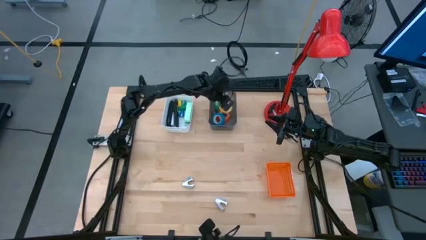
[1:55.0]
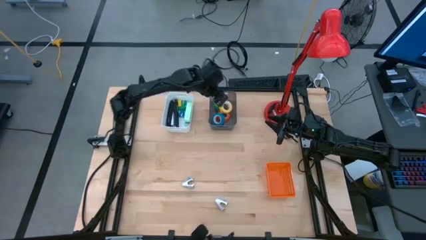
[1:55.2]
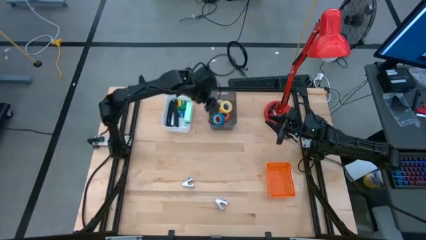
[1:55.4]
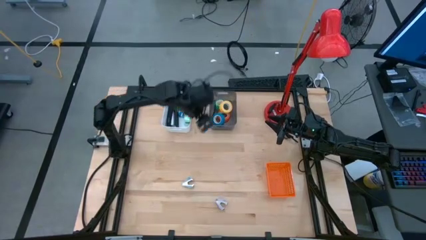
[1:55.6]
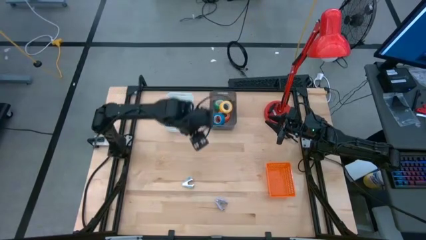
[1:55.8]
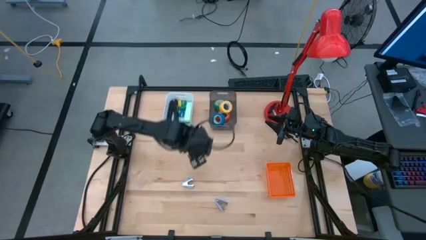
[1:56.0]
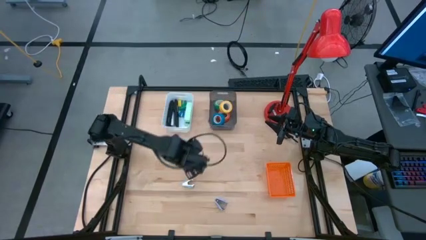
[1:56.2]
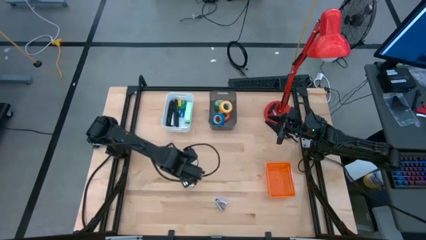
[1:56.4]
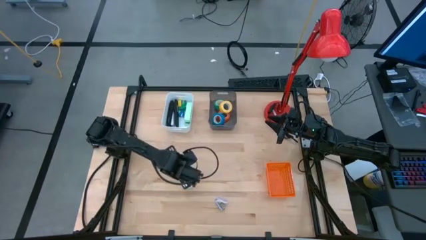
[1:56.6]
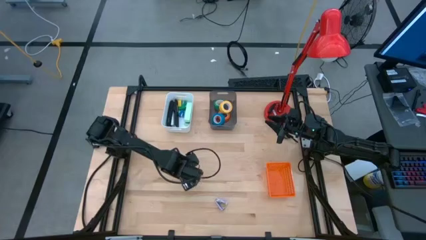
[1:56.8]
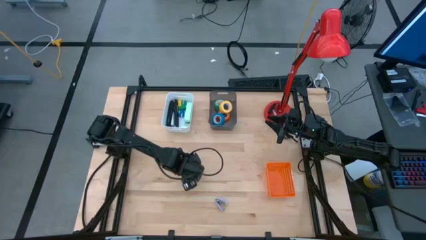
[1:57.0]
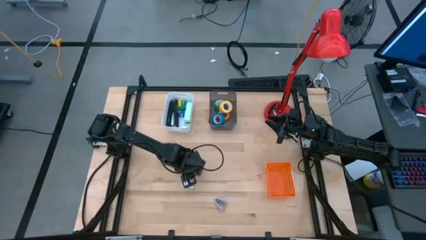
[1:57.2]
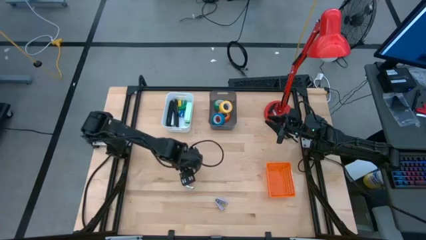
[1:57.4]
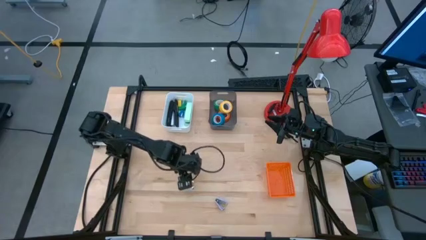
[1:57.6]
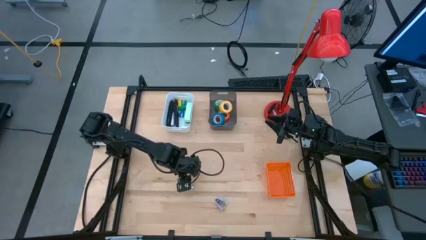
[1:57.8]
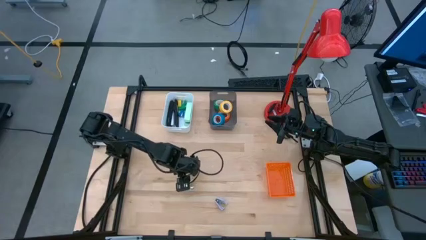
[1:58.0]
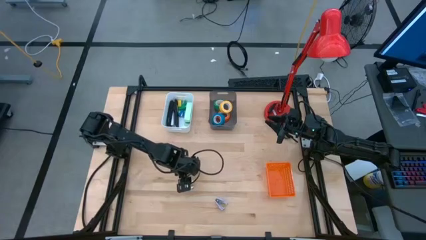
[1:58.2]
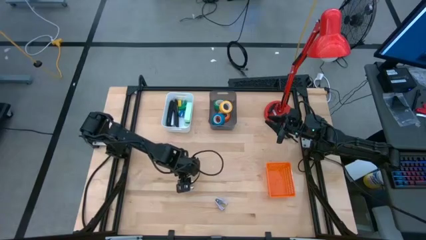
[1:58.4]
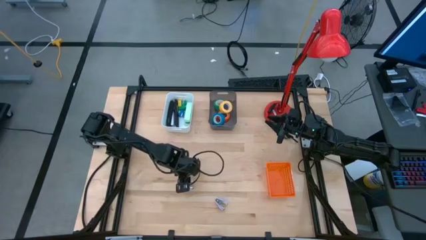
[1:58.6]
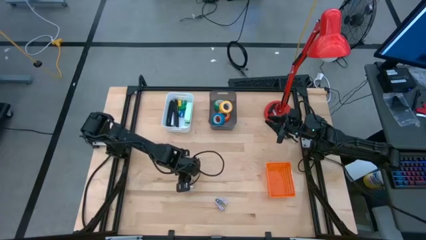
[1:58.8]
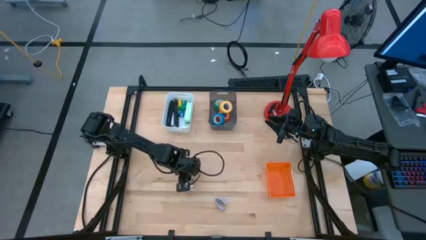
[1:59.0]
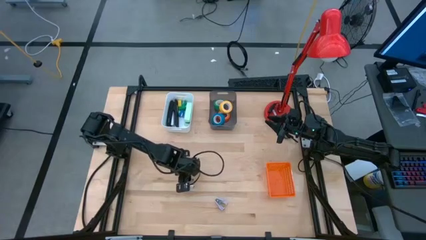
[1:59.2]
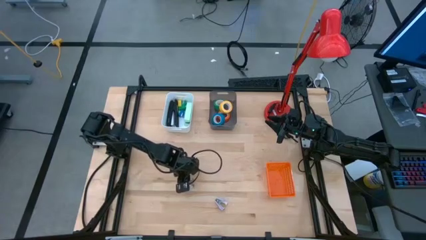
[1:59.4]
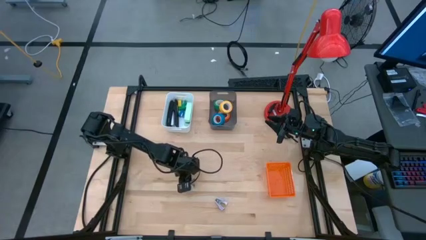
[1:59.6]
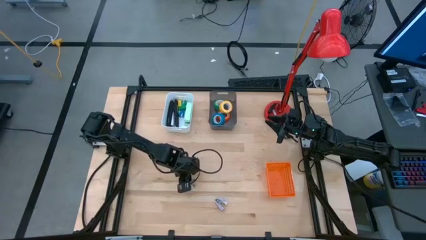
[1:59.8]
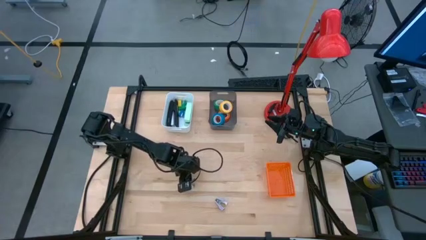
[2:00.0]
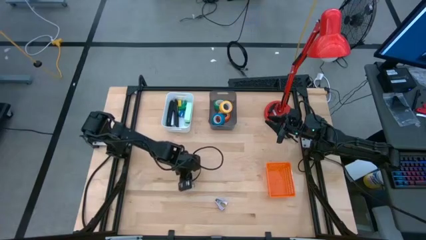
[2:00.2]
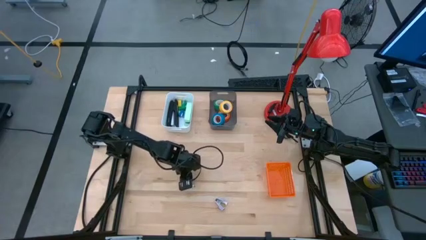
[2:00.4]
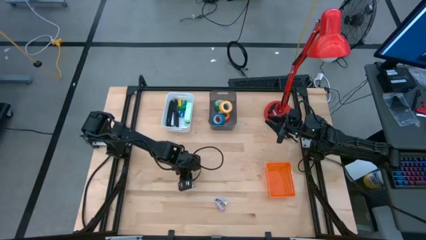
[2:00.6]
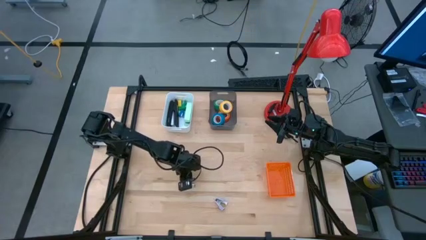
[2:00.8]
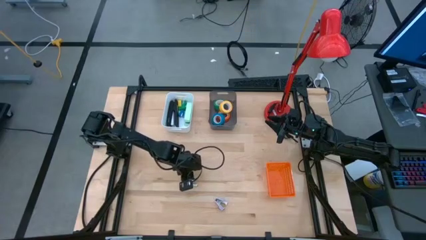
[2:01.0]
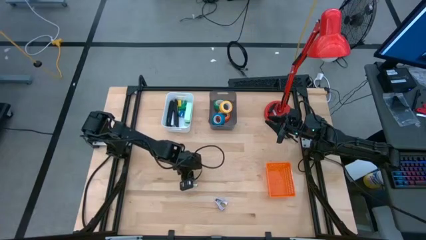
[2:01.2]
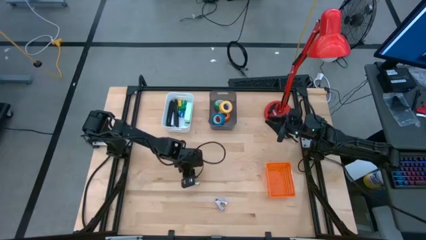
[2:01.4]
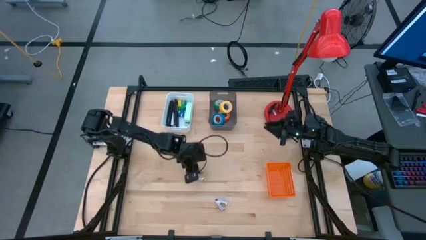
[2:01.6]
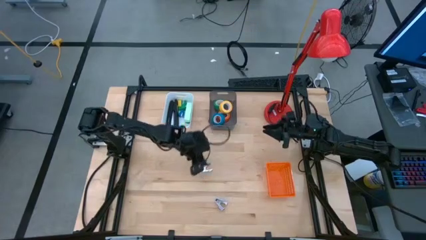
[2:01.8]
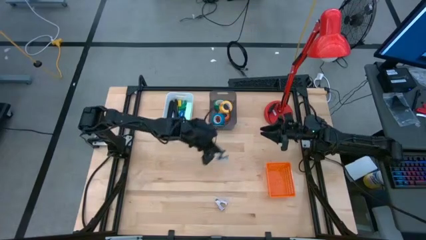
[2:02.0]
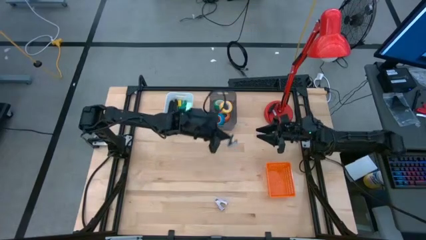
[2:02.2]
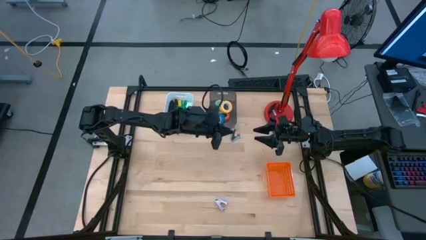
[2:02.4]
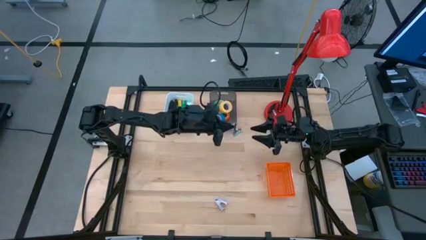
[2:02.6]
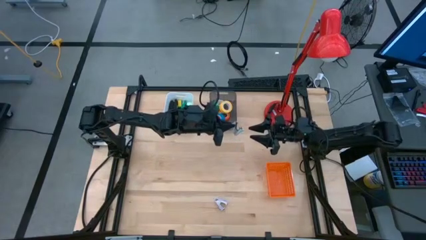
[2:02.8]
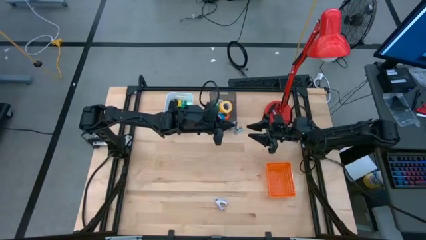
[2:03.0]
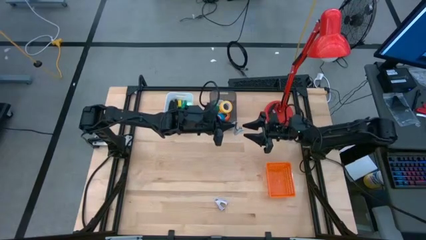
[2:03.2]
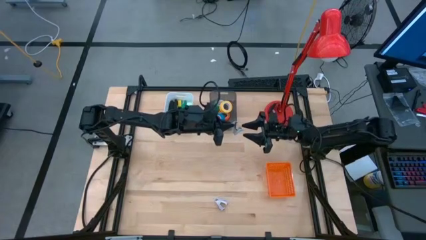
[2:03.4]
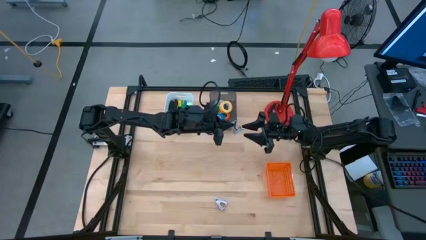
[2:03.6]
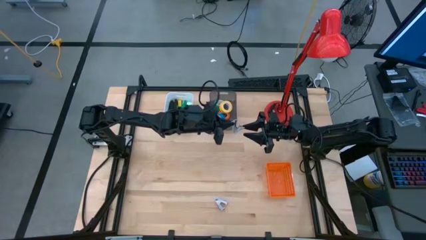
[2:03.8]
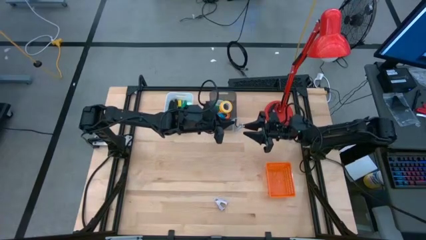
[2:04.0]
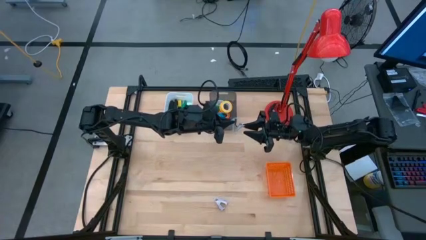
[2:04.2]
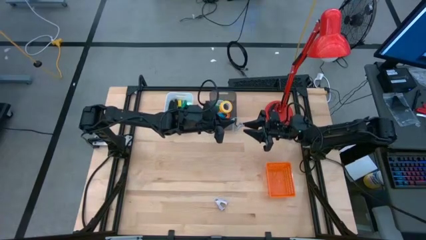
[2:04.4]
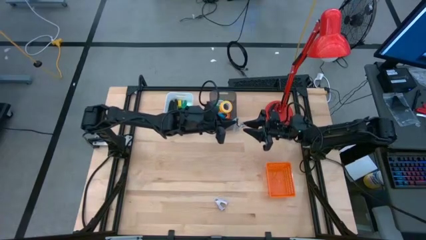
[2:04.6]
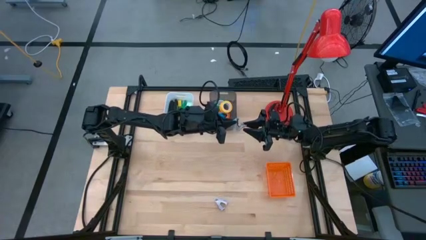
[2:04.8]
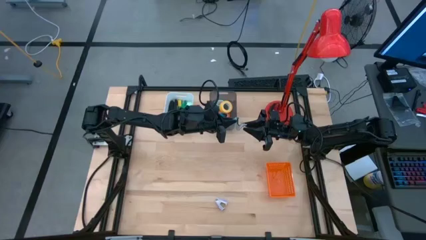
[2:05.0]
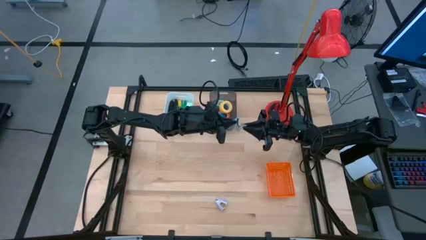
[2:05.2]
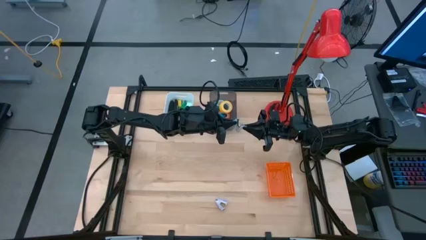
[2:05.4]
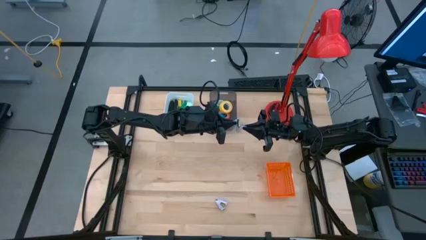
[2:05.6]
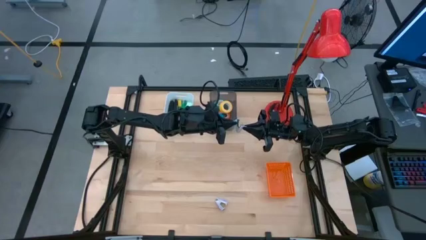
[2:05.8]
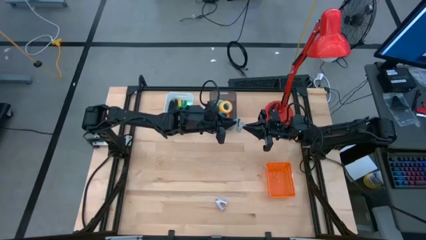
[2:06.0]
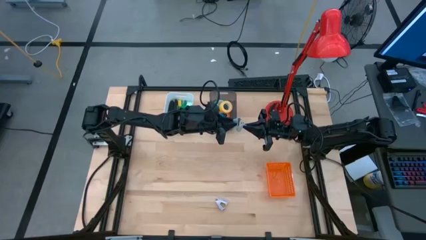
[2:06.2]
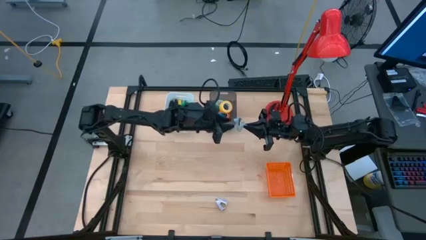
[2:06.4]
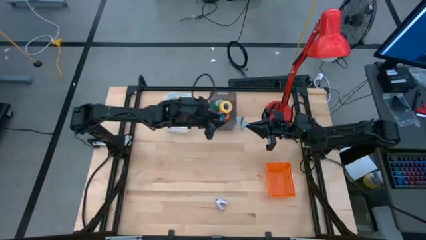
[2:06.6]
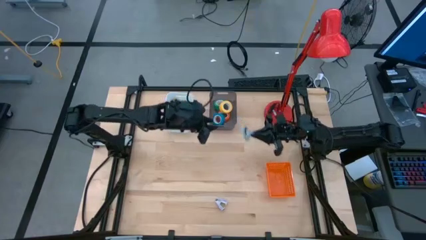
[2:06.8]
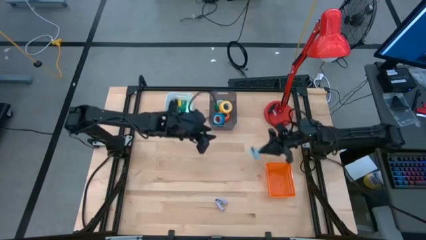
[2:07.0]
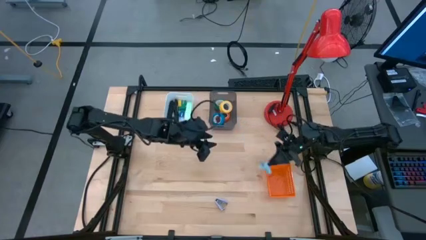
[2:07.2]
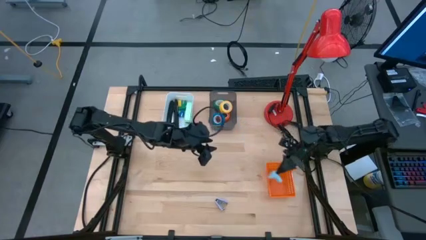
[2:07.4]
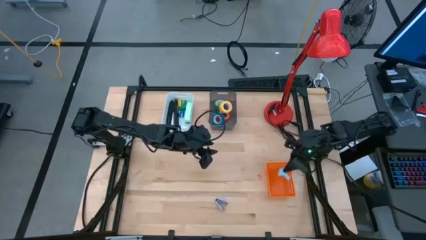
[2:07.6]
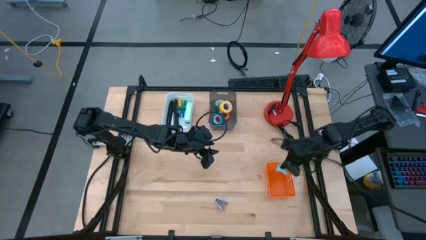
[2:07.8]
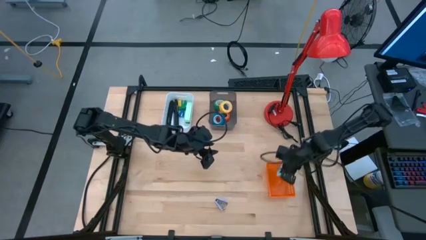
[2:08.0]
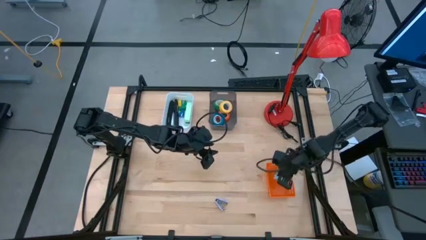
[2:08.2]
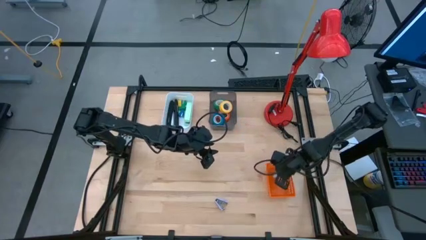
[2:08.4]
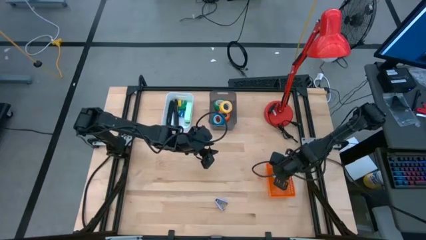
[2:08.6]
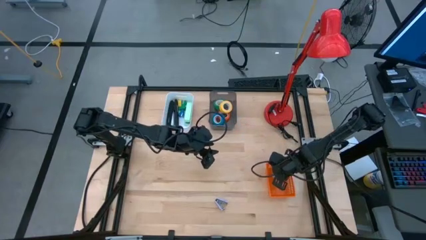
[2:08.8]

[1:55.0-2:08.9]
Task: Pick and place Stapler, Stapler remover, tape
Put the light blue staple remover into the orange basket
